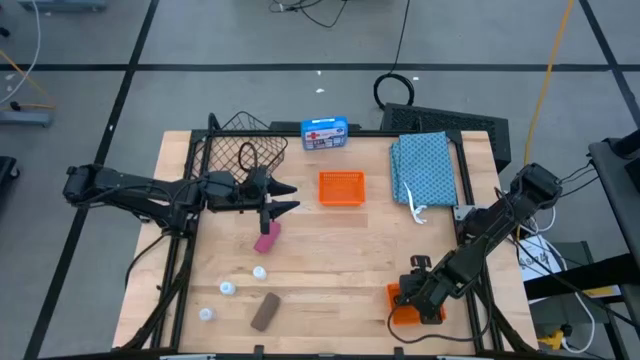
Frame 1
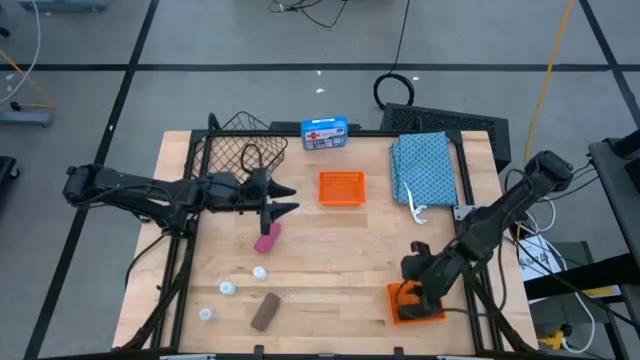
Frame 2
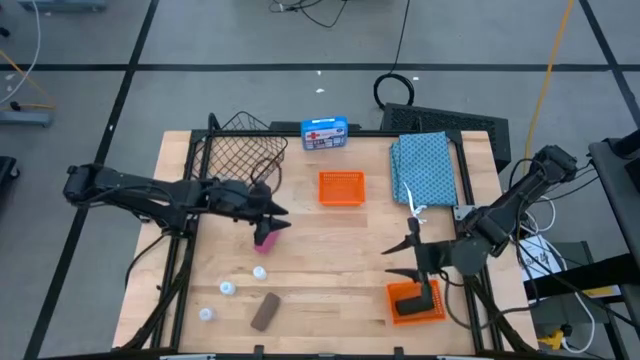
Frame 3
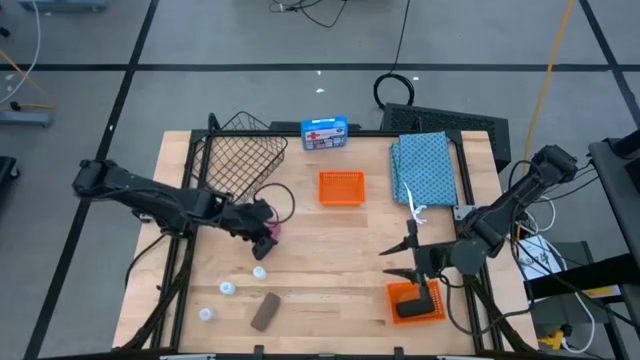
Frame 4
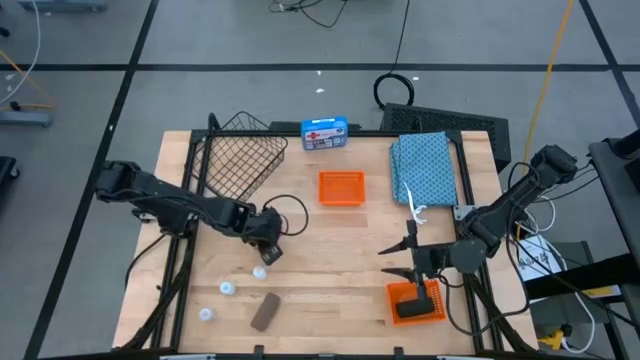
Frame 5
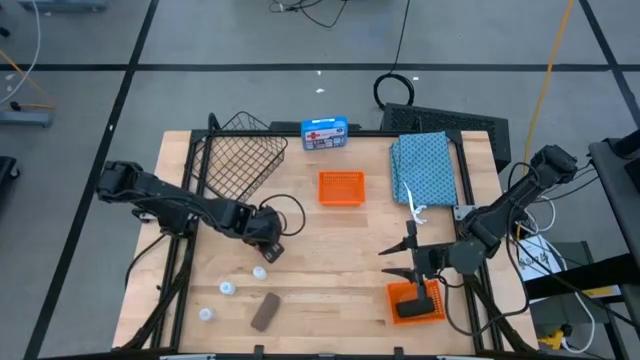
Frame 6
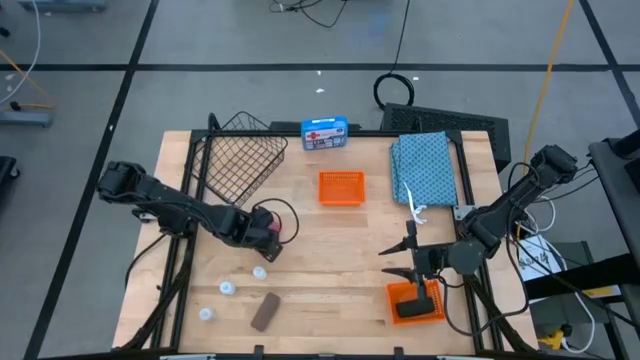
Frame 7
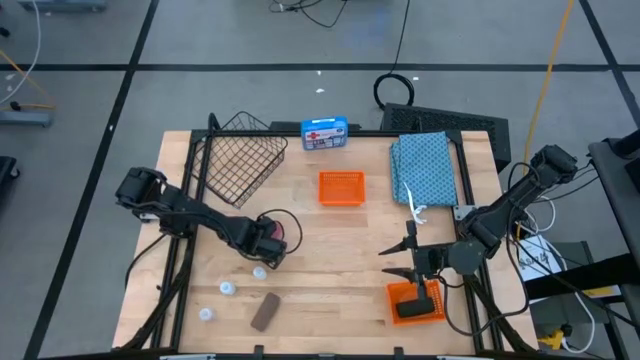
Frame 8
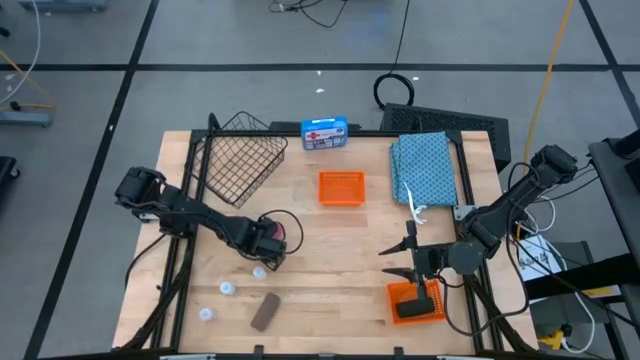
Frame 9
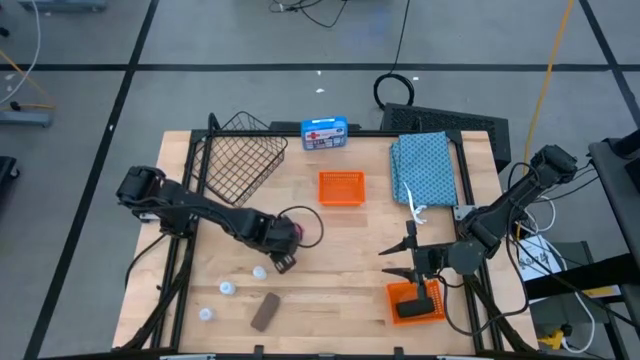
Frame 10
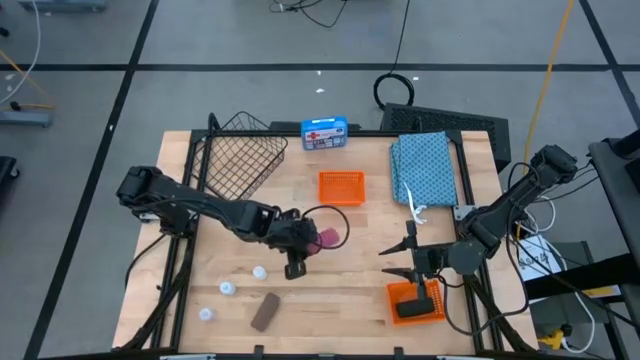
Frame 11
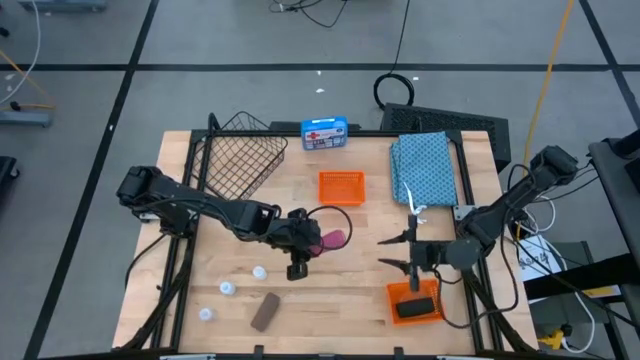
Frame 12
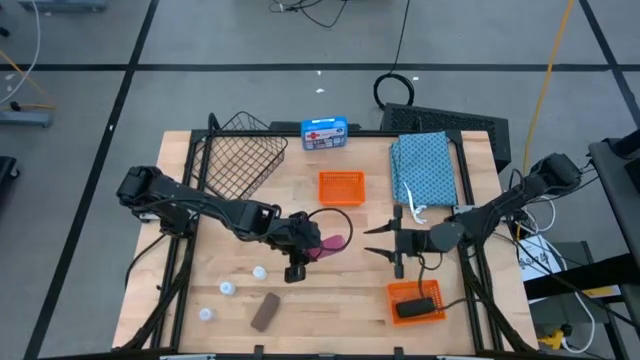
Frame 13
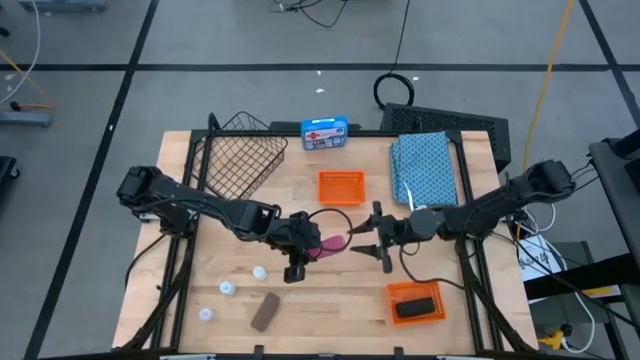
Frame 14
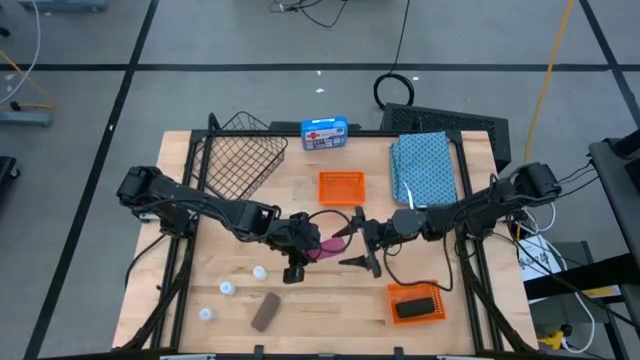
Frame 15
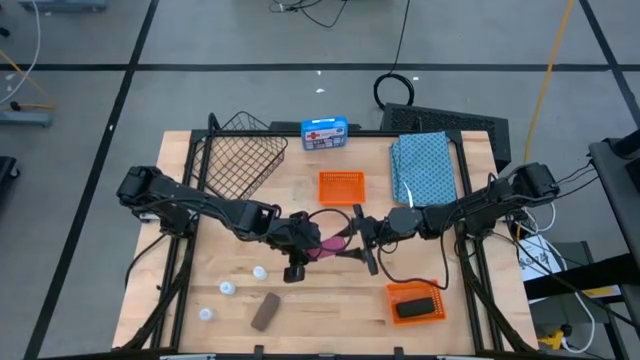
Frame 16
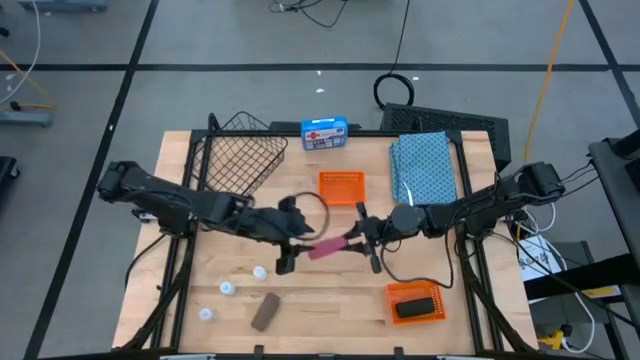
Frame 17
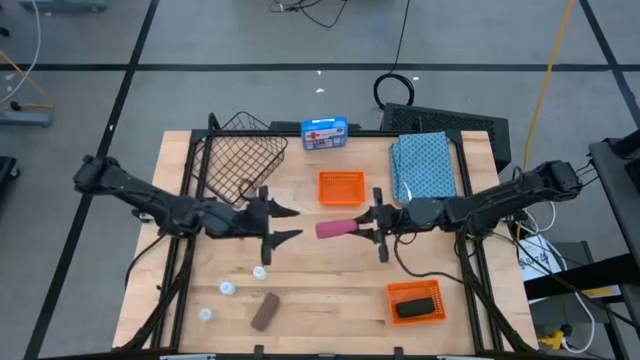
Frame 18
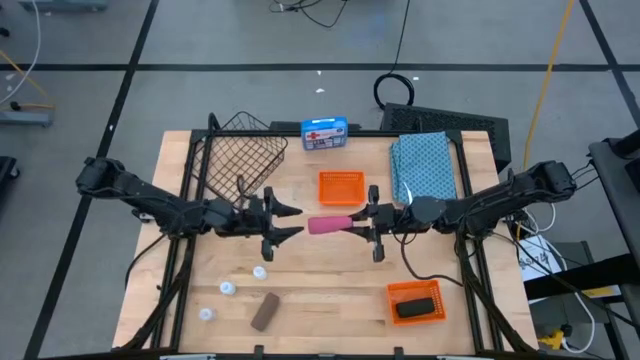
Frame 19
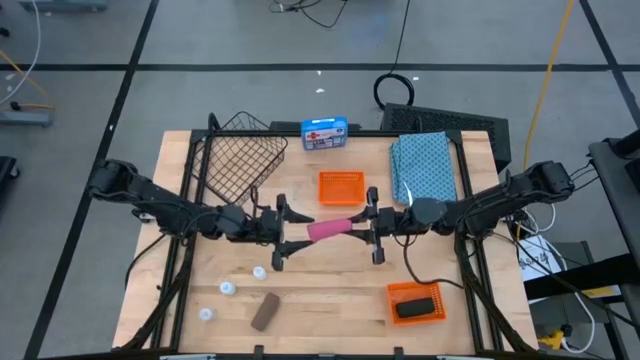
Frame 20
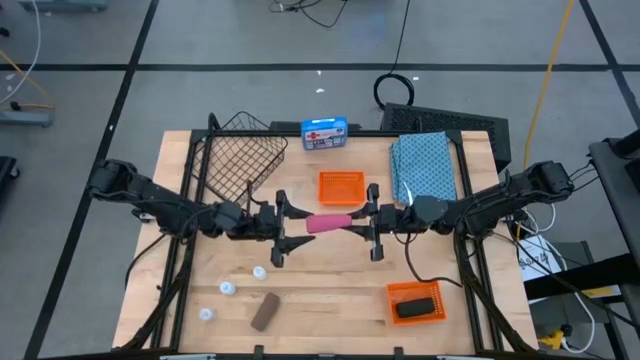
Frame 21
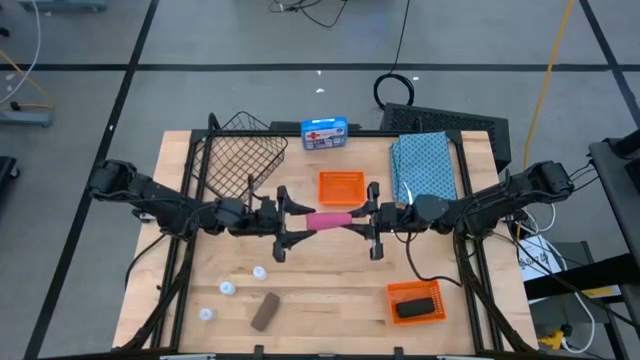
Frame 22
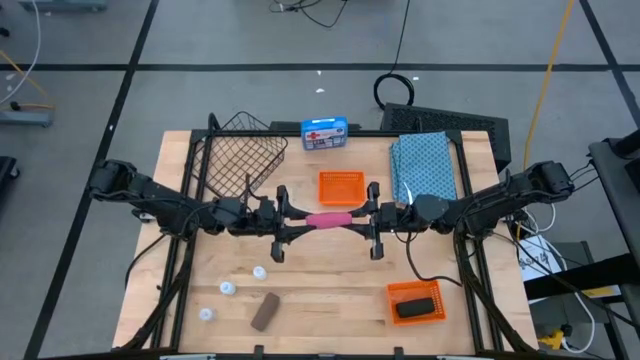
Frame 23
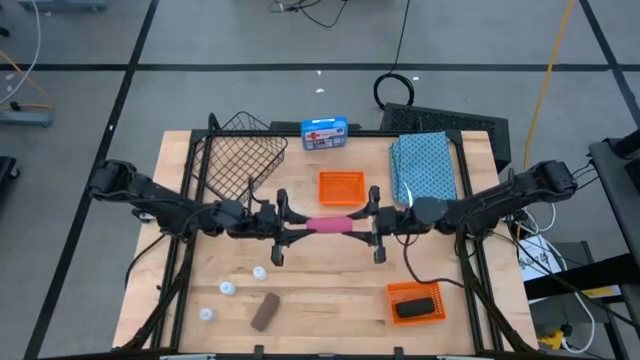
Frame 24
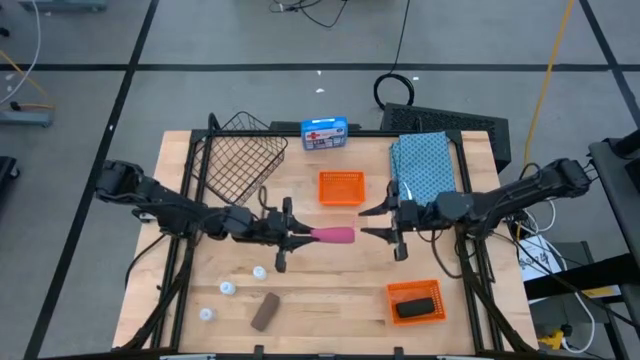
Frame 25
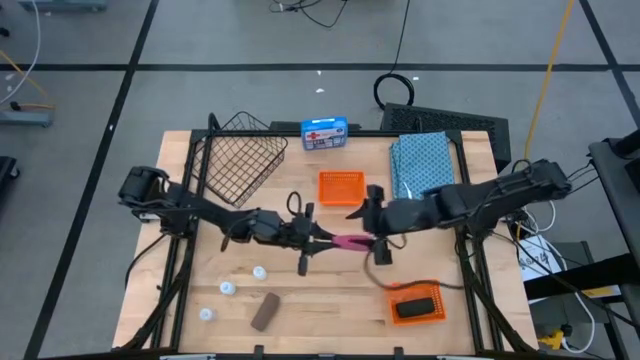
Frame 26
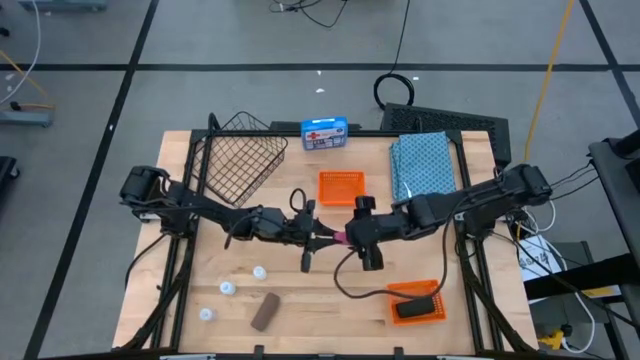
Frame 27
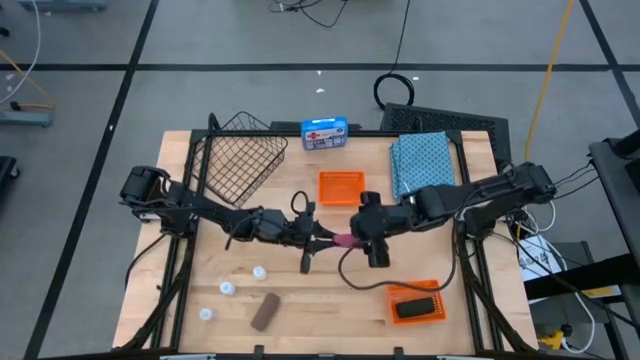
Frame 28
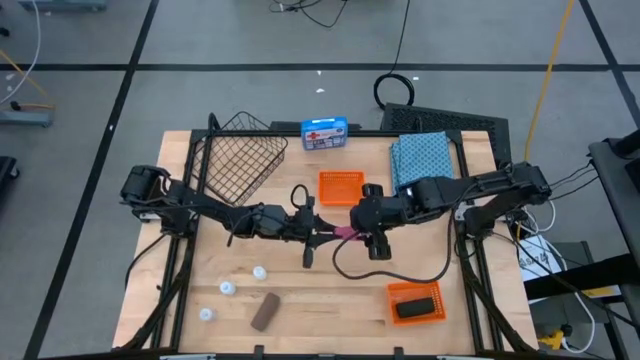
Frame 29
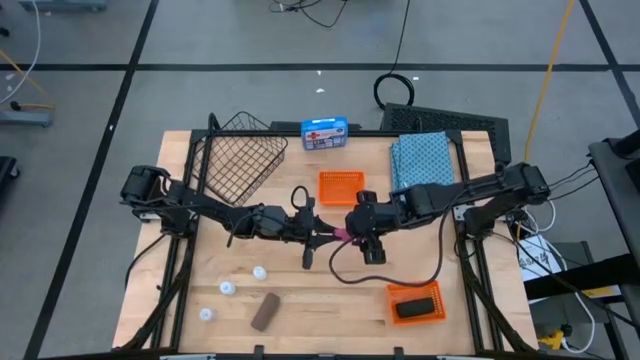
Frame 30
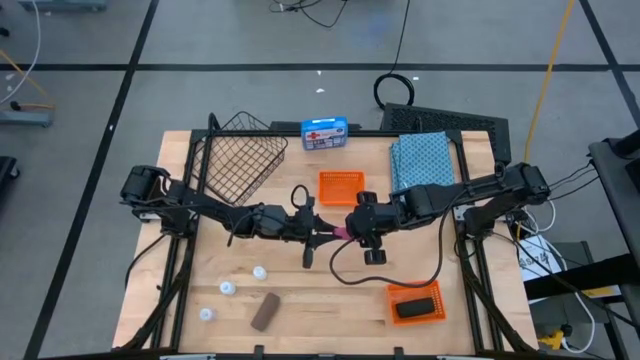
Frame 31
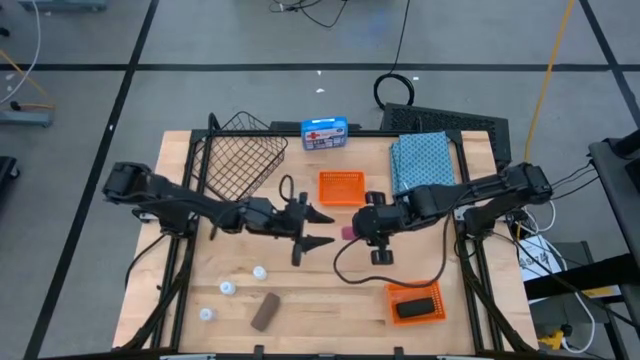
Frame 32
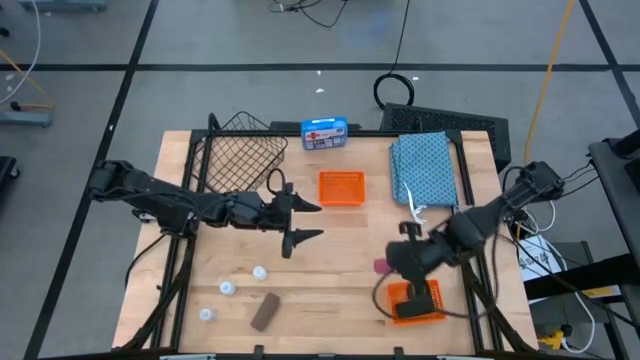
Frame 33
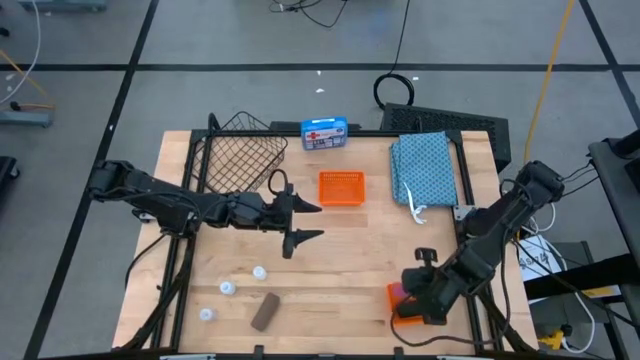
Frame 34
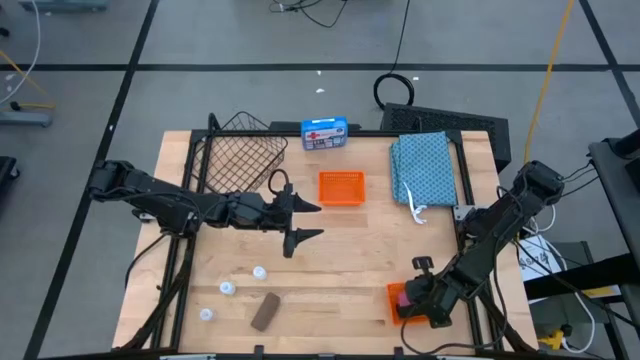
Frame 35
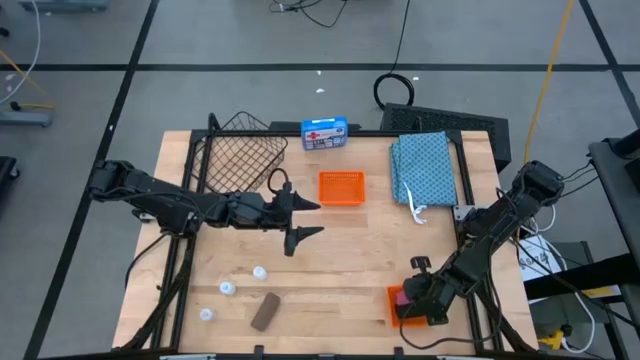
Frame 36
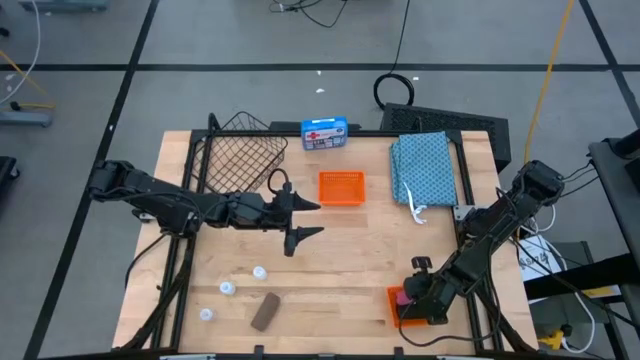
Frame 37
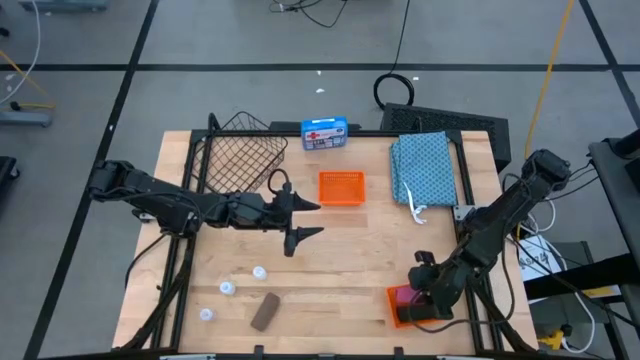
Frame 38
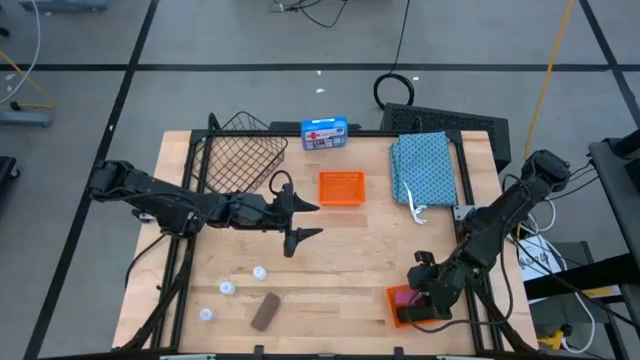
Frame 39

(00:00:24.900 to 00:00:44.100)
Task: Pick & place medical supplies in basket/bin
Put the pink bandage into the bottom orange bin
